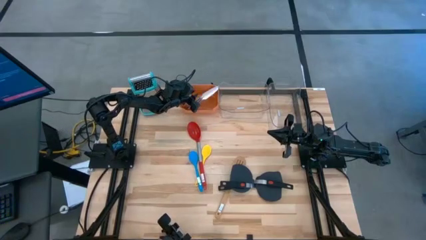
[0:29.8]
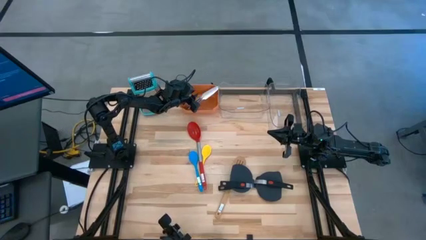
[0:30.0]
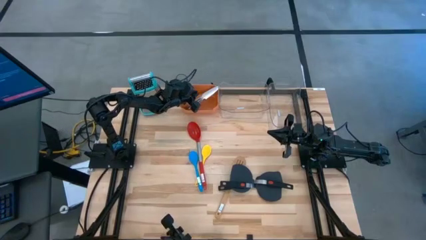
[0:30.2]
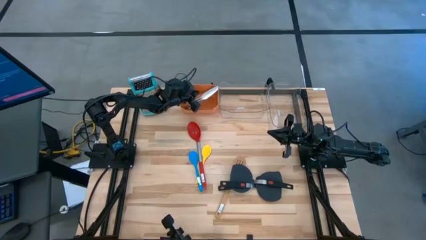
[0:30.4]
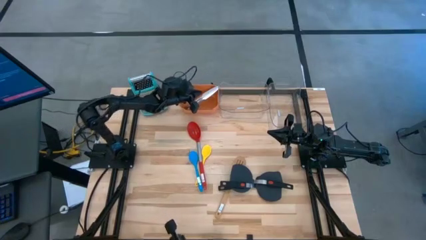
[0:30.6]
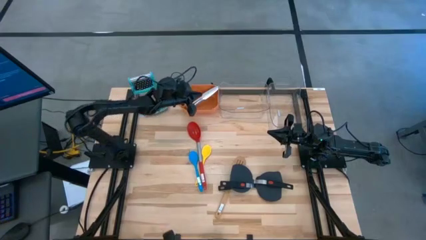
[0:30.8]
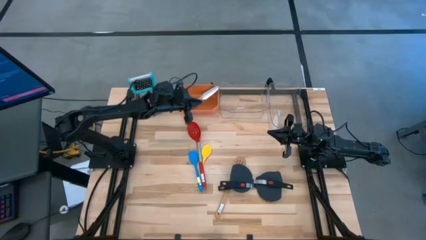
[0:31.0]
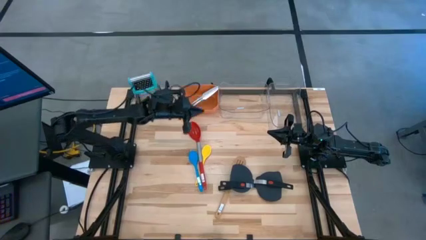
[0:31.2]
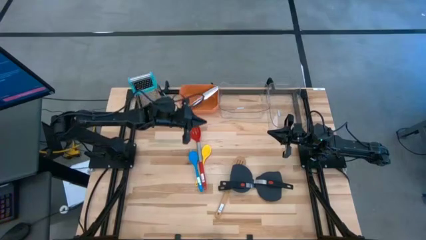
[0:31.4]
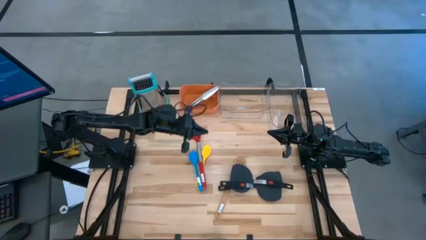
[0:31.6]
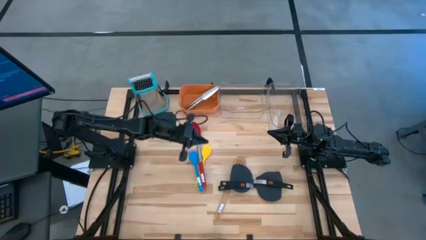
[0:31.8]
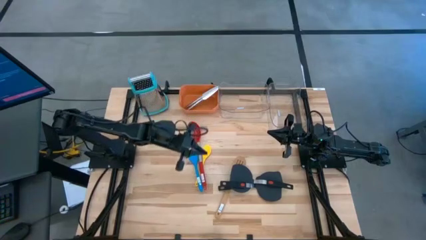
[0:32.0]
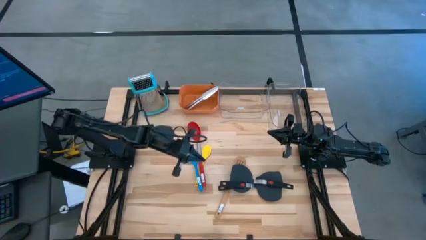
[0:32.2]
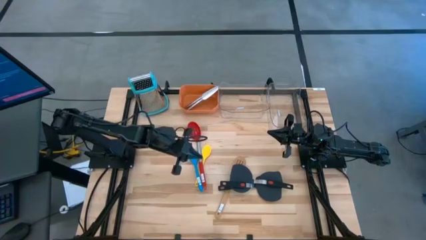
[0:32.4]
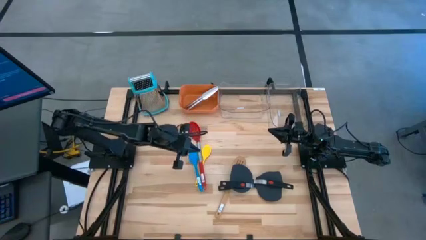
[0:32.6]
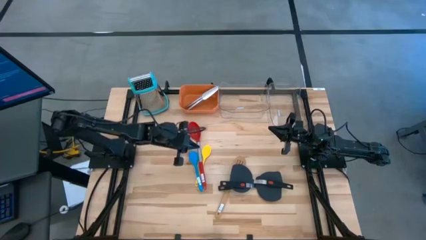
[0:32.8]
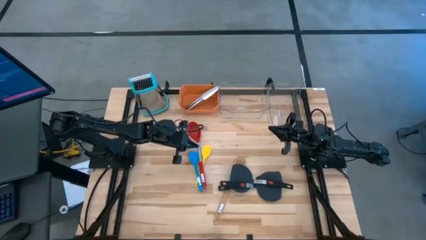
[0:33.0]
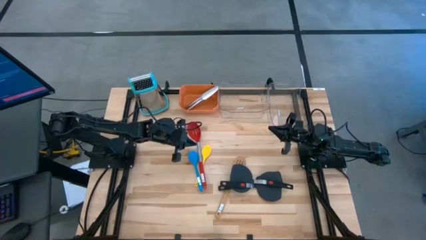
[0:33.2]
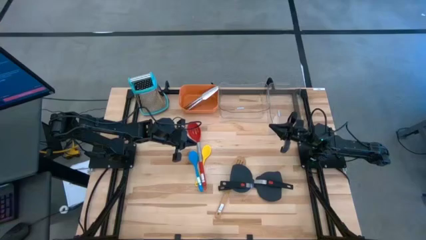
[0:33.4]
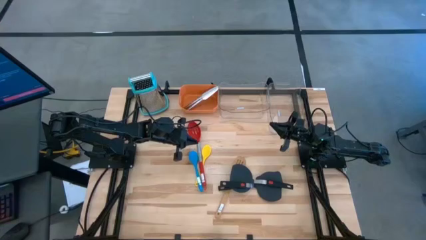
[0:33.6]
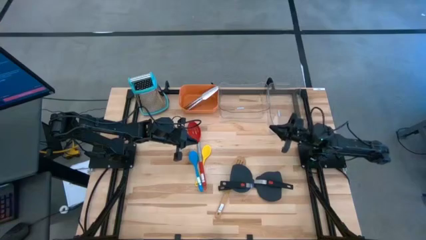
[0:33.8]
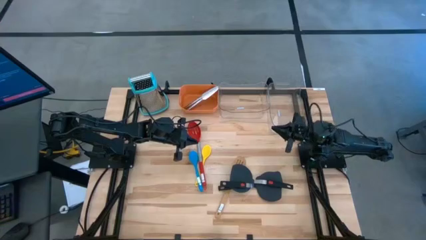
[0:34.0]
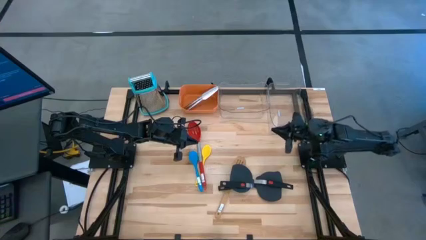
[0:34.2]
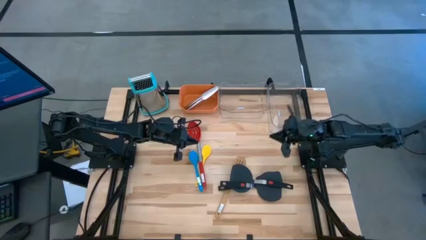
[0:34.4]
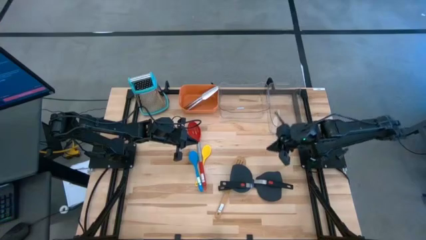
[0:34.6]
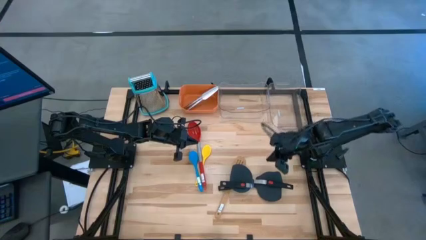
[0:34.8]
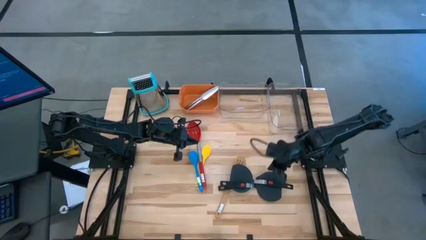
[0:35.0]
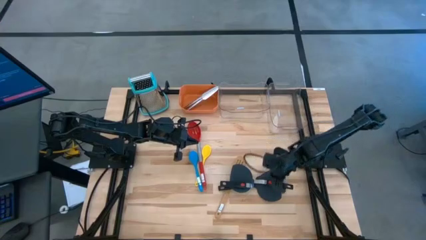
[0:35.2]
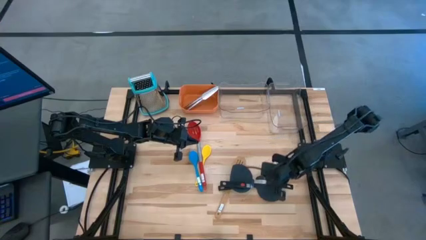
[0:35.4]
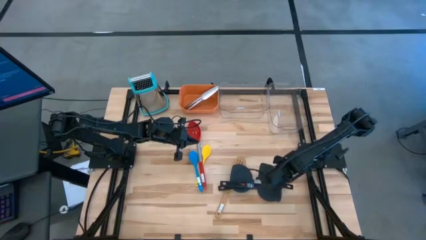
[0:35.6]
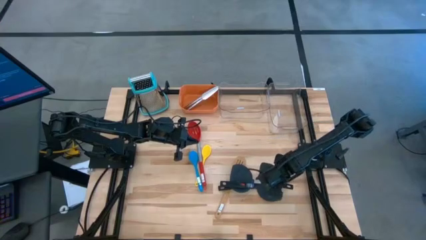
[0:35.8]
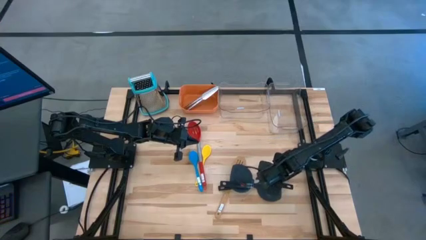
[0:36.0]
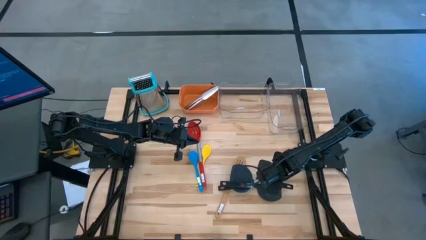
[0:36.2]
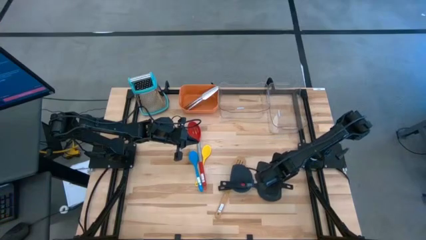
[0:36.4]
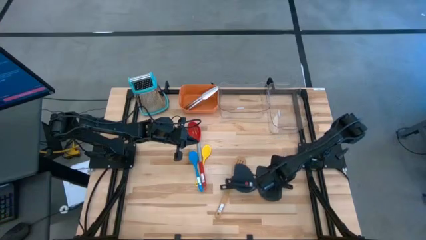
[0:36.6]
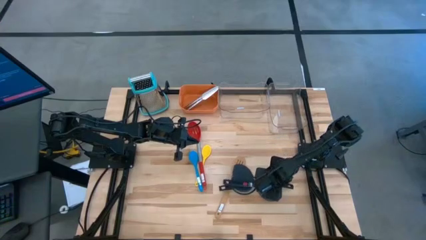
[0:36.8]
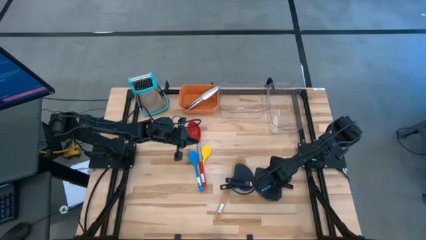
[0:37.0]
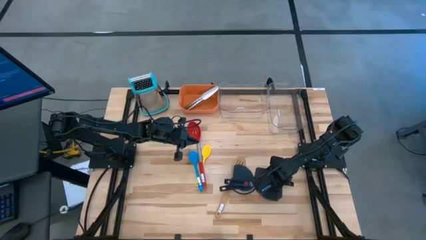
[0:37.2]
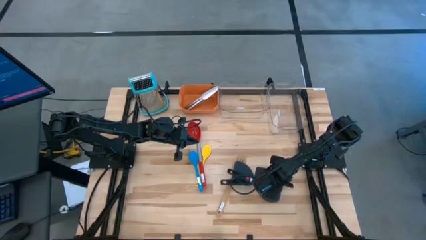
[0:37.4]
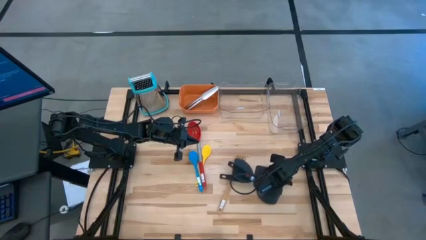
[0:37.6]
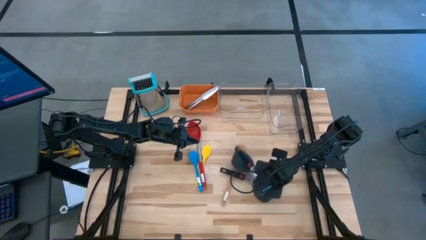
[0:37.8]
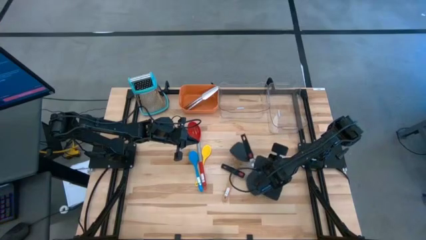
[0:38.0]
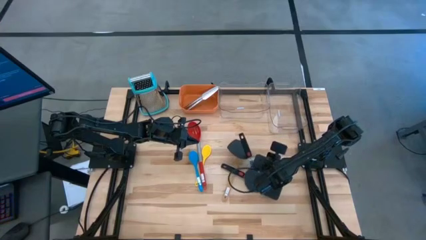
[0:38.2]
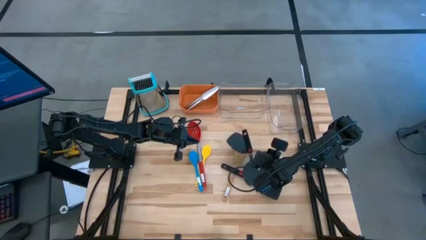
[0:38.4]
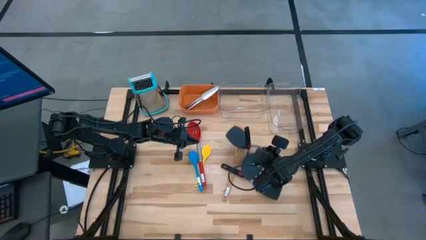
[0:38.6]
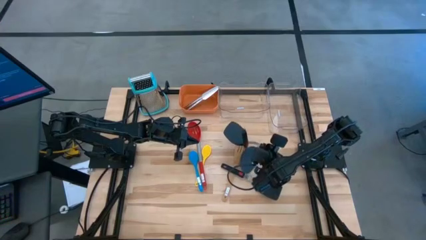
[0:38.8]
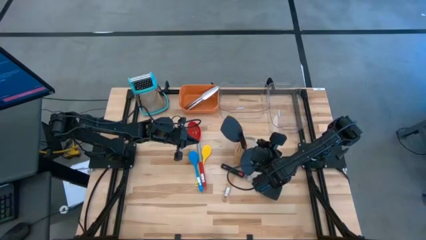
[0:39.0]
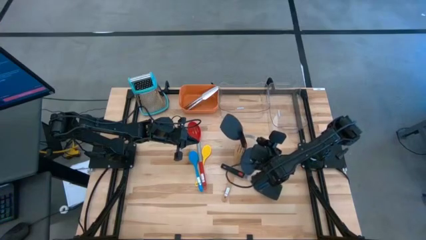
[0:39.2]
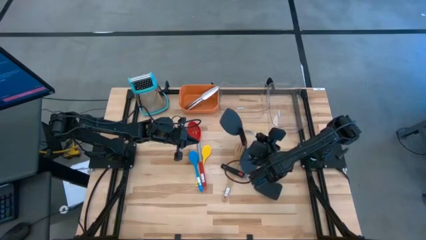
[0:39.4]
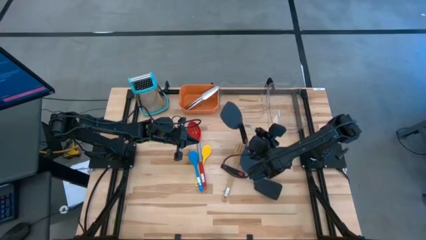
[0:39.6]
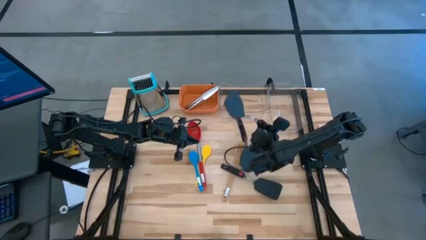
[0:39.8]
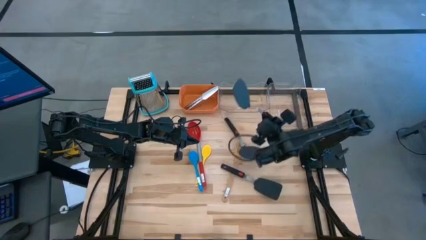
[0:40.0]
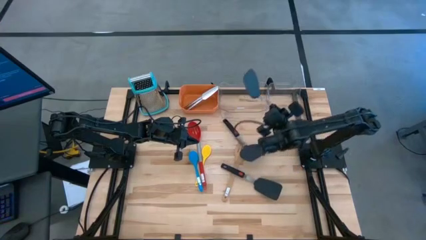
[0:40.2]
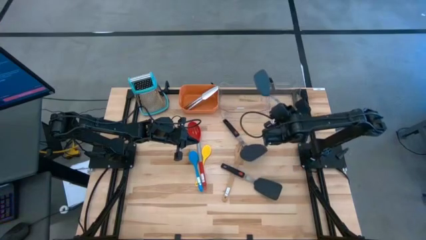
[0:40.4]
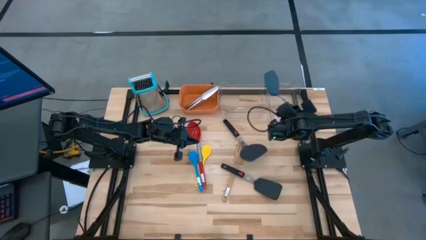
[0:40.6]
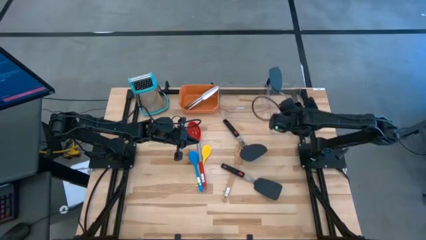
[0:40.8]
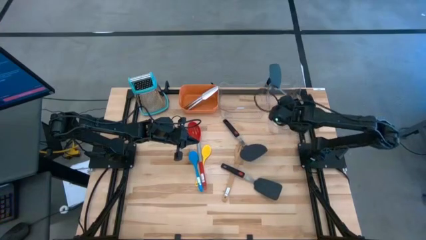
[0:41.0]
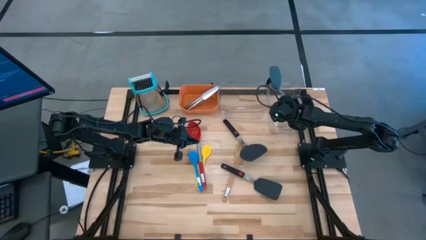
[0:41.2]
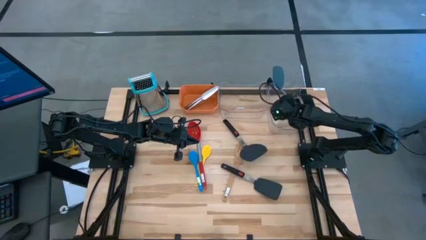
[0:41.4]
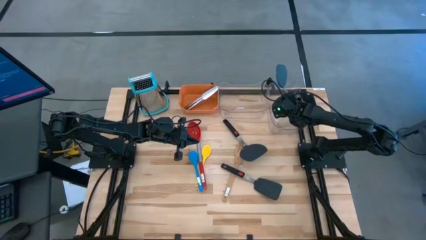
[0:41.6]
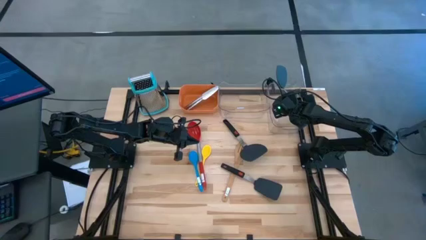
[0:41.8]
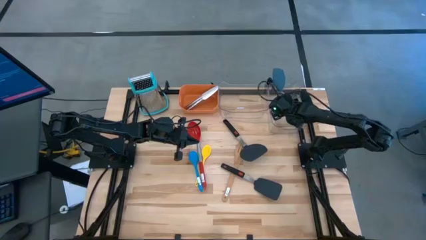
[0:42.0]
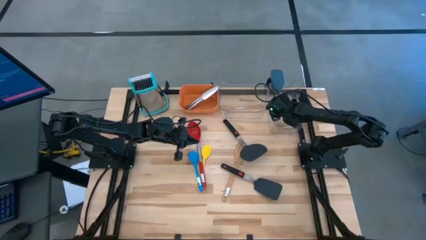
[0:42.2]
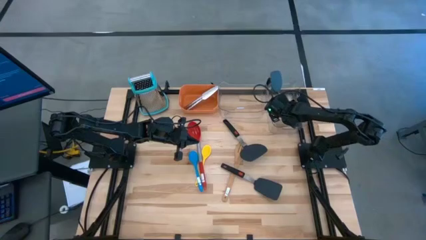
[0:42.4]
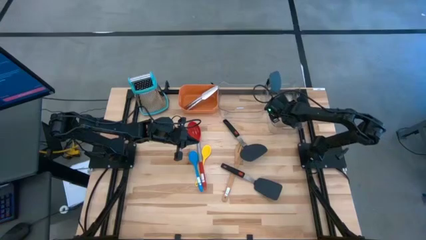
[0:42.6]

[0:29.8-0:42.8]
Task: Pick & Place Kitchen Items
Put the black spatula into the right transparent bin

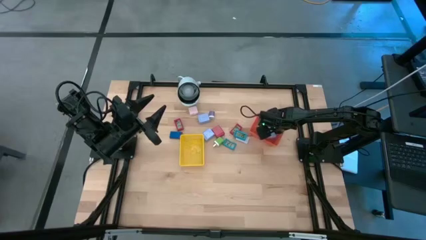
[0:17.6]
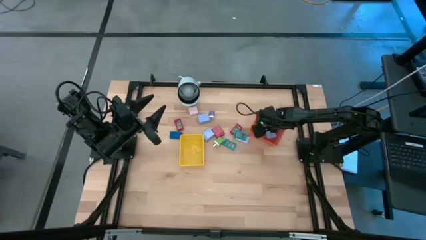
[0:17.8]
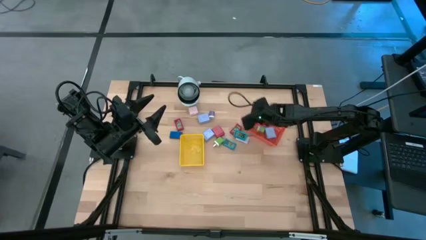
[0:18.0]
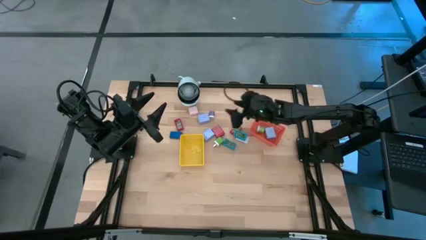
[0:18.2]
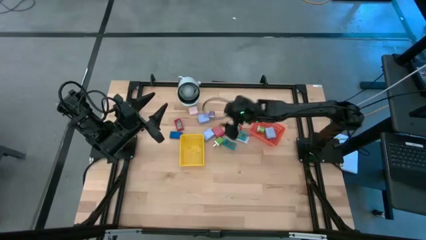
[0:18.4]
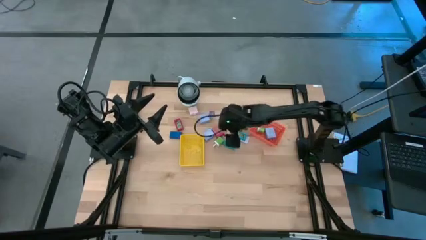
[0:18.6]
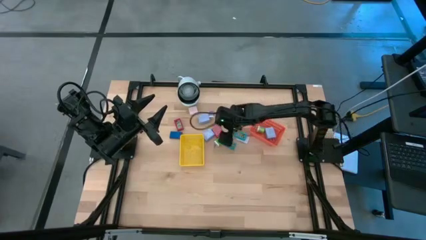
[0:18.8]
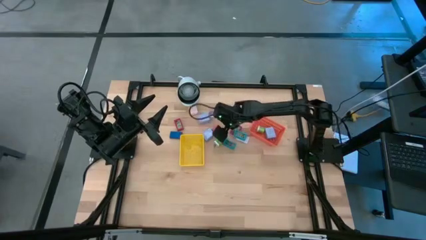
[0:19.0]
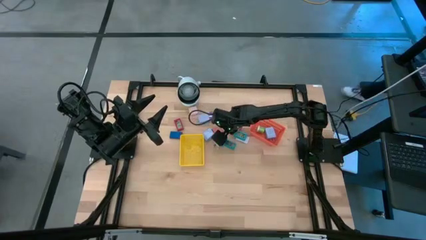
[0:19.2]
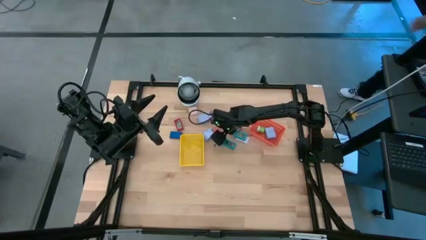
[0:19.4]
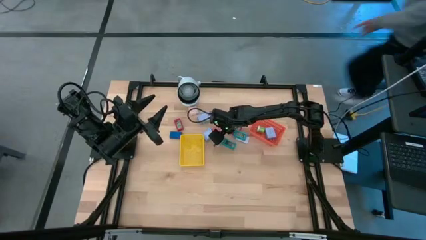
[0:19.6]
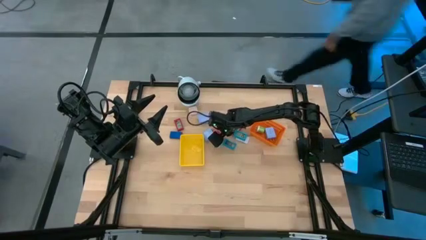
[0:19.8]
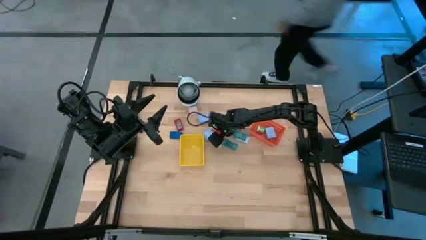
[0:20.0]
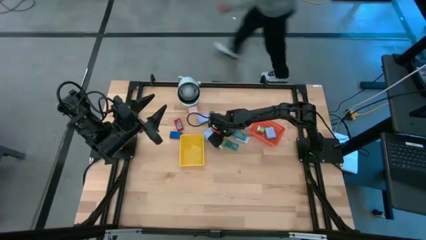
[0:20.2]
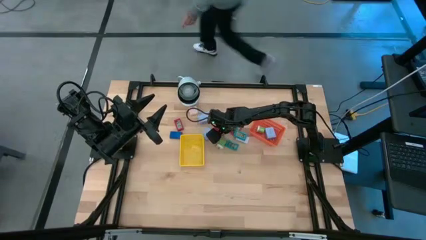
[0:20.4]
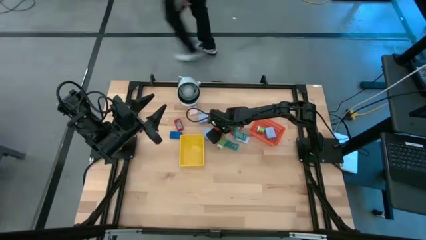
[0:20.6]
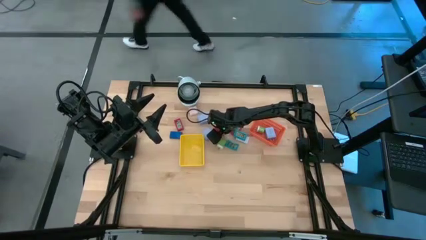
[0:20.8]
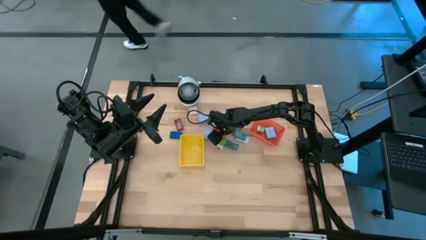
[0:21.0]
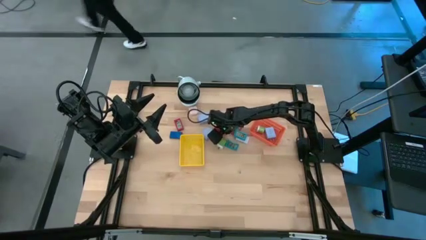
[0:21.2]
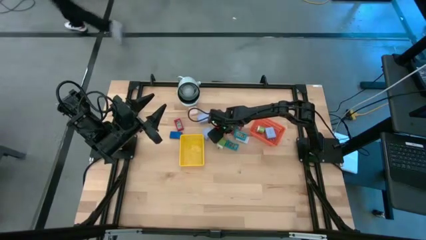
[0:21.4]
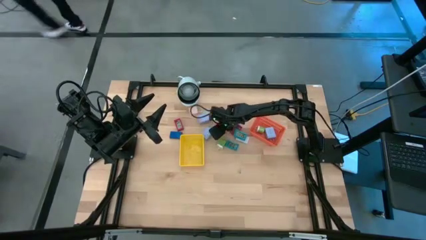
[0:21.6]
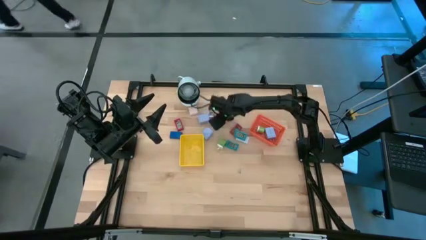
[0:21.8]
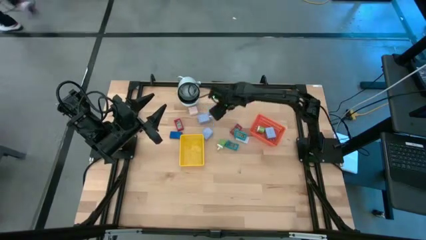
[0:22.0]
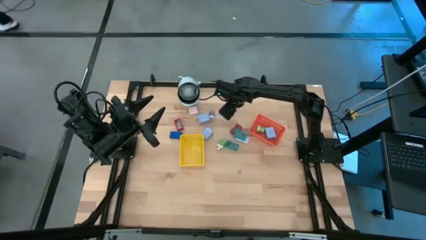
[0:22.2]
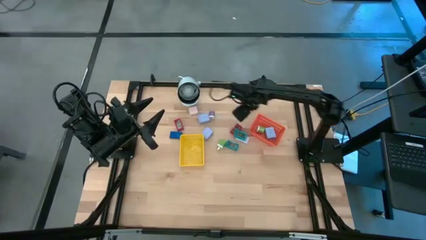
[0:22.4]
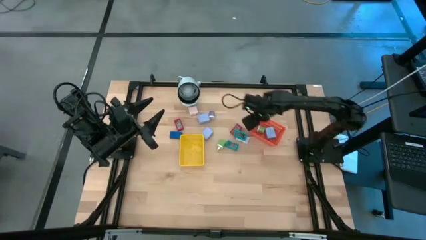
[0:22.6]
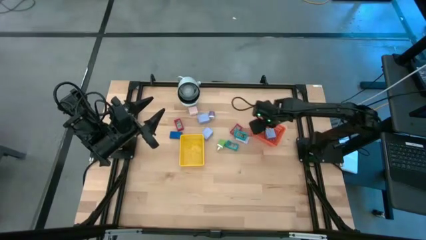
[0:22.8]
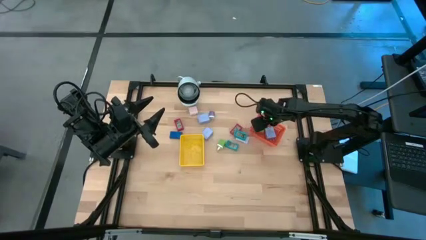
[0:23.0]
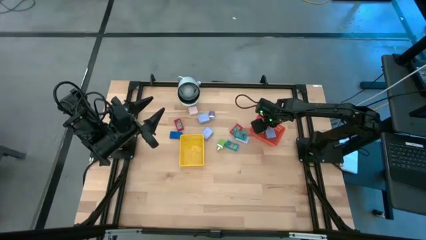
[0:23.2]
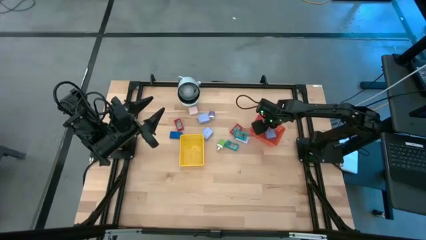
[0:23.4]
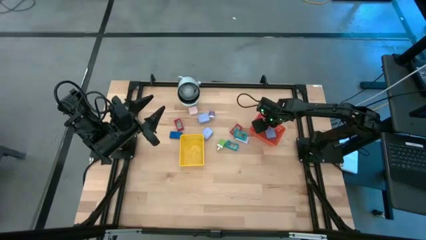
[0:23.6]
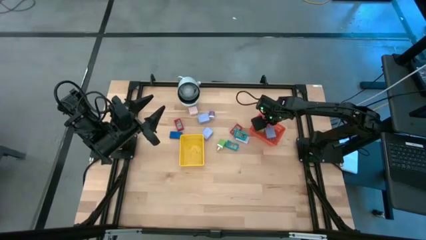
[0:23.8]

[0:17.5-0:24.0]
Task: Pick & Place Office items
Put the red charger adapter into the orange basket
